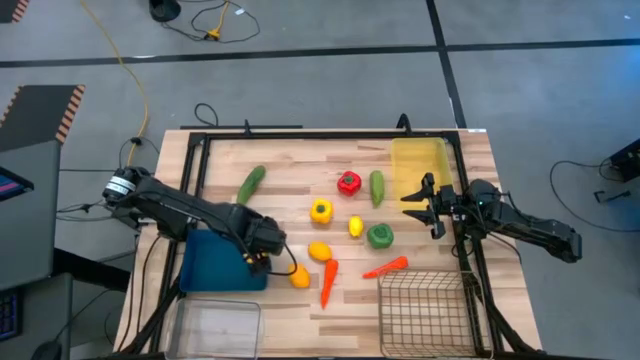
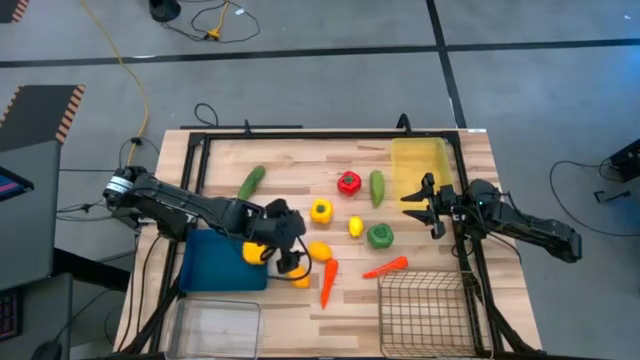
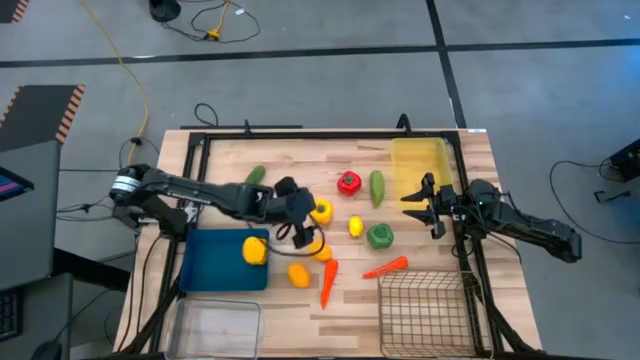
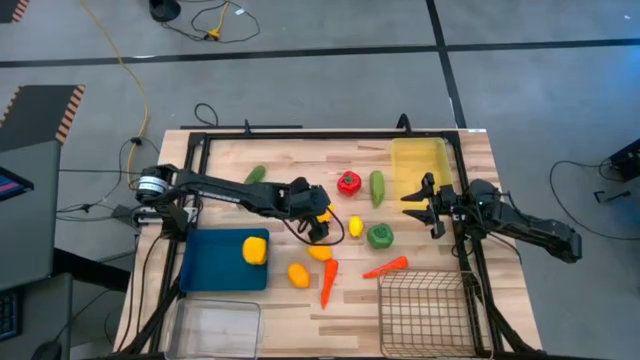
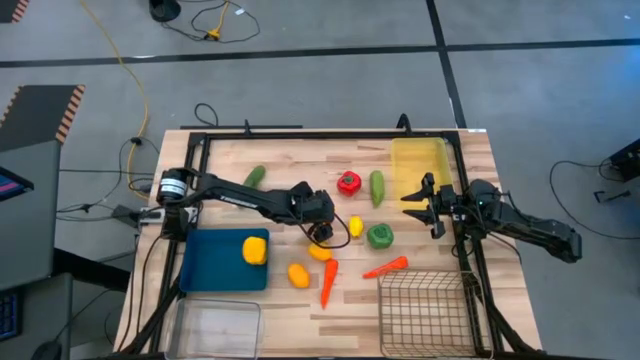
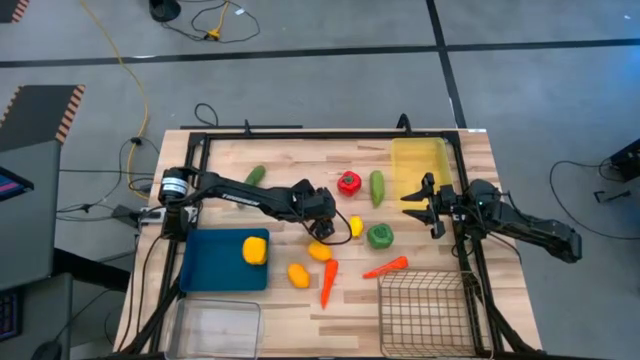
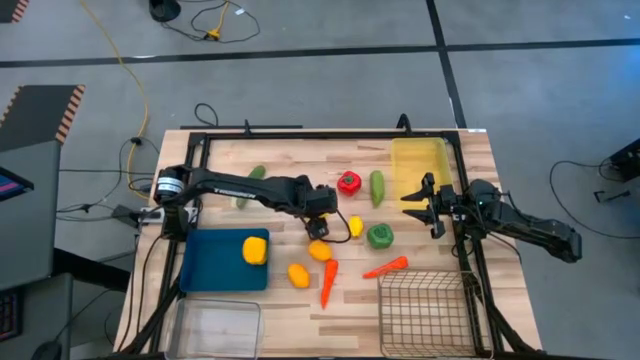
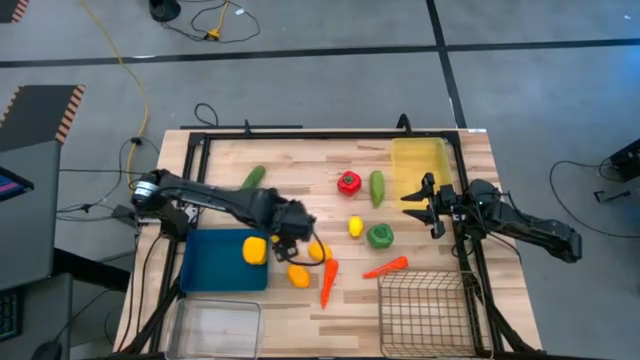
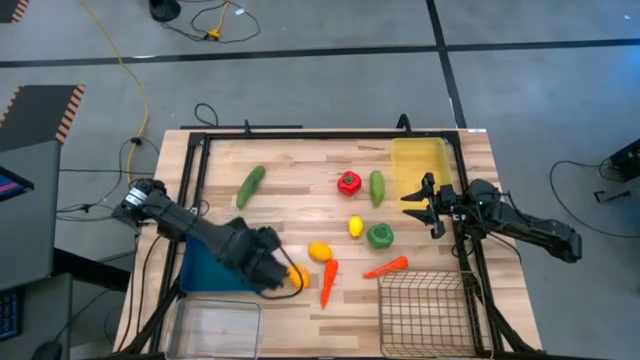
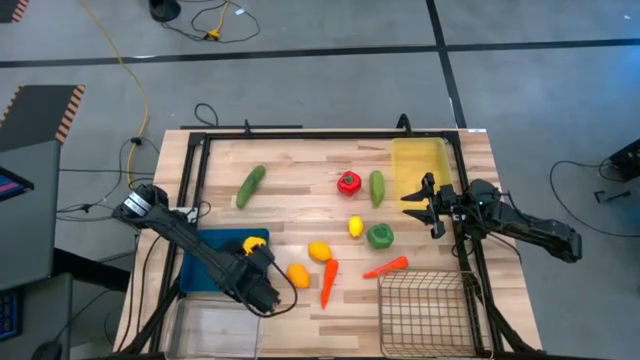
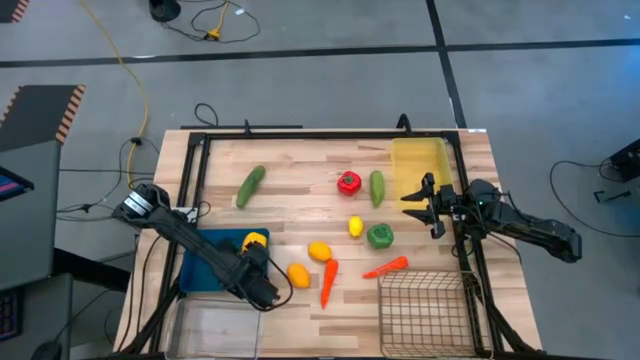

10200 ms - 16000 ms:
Task: Sort produce into baskets
Put the yellow bell pepper into the blue bin

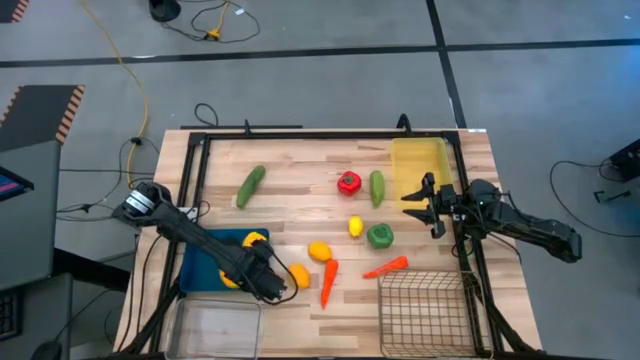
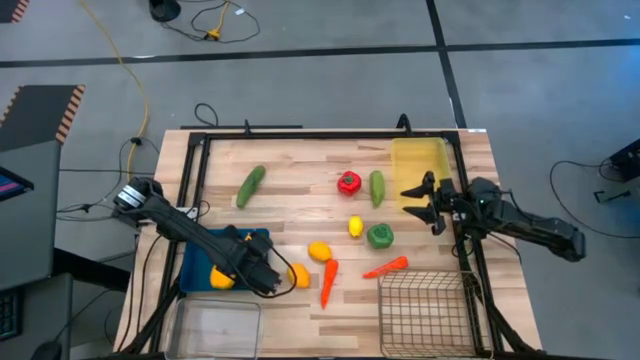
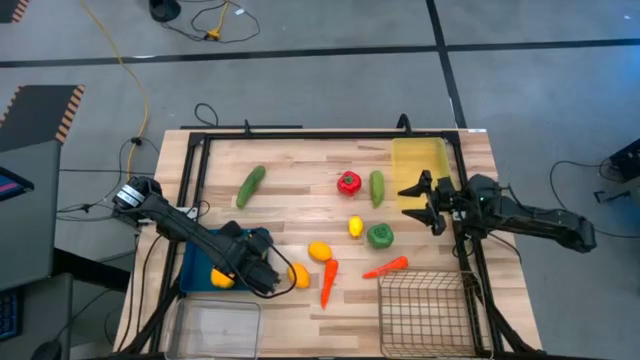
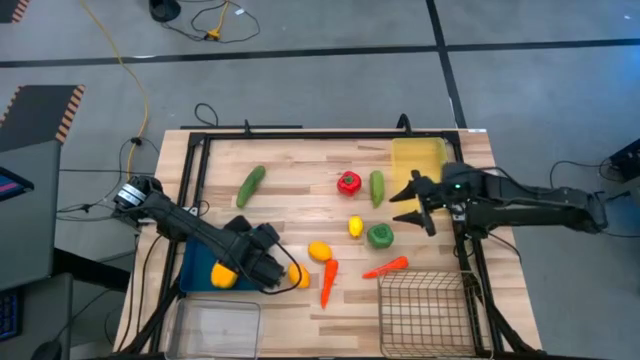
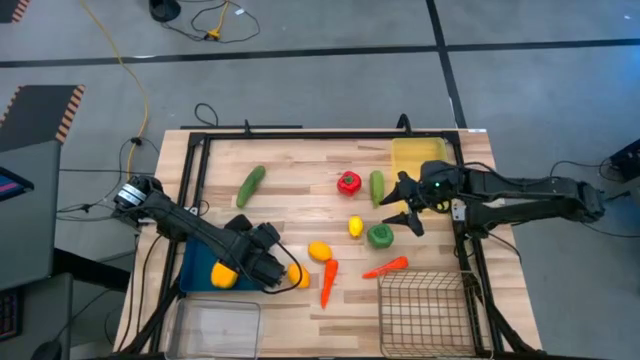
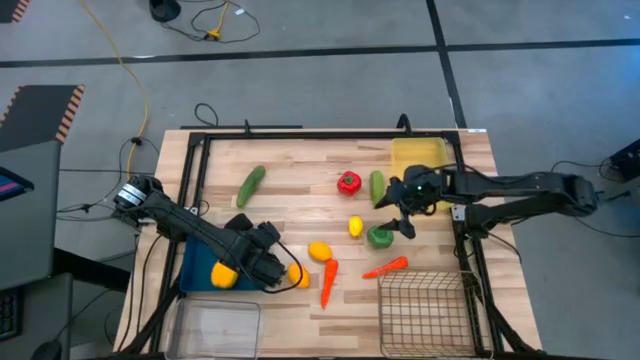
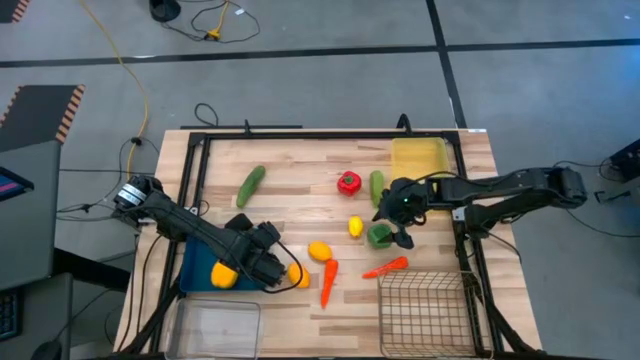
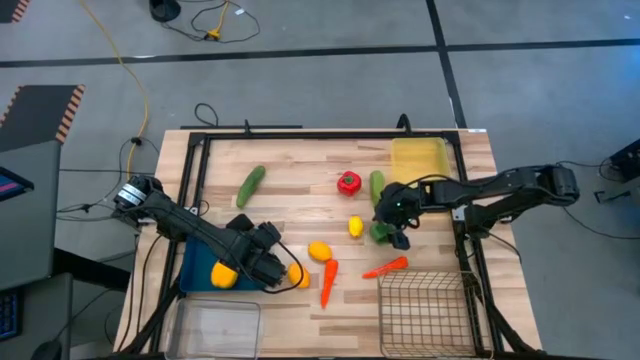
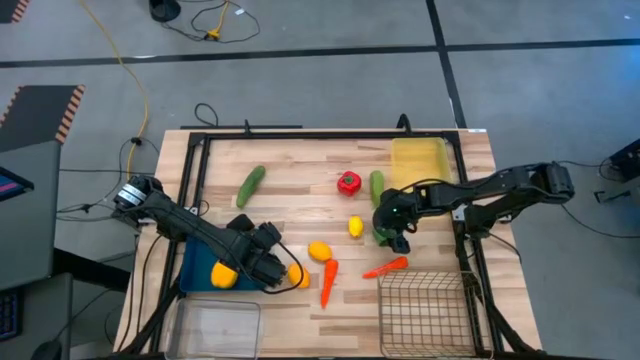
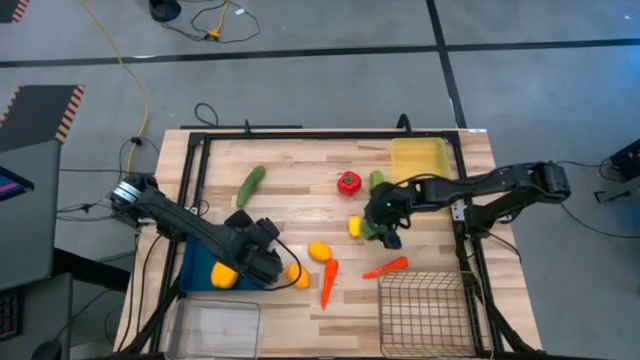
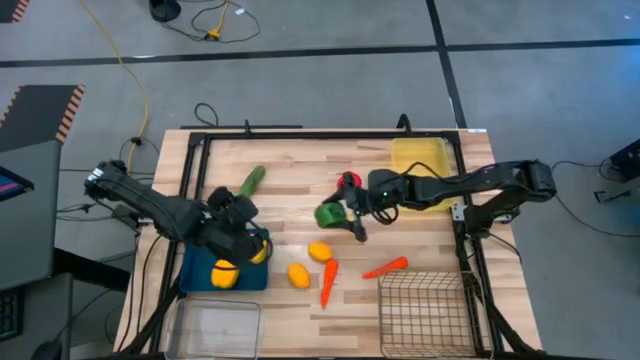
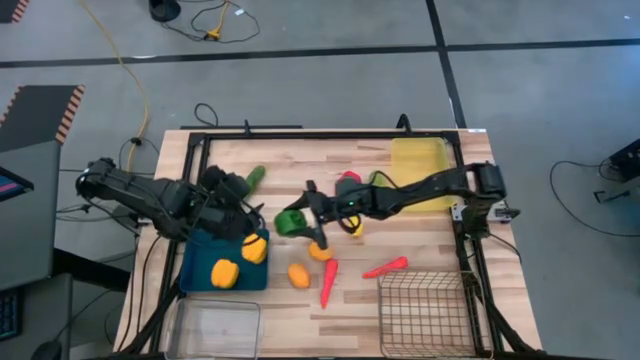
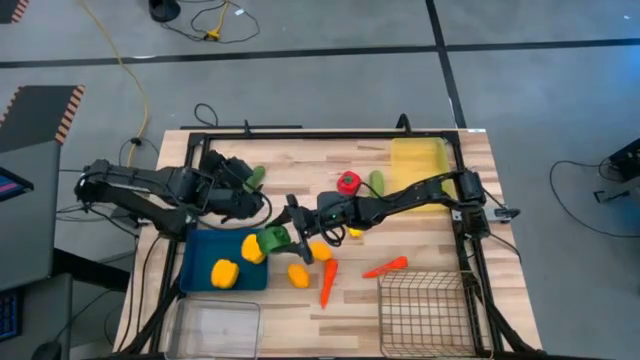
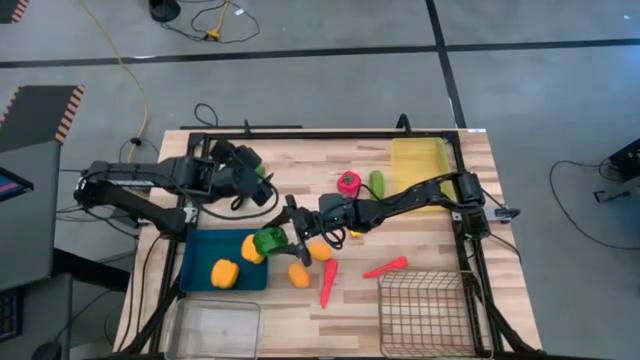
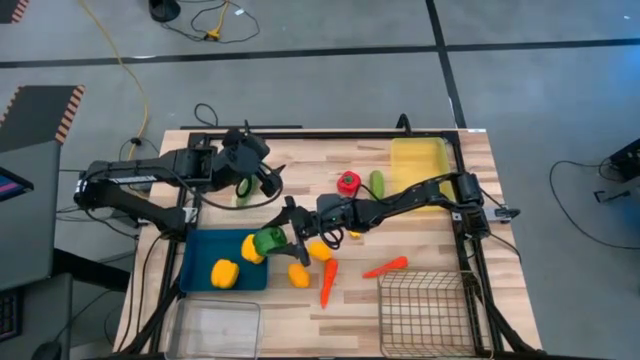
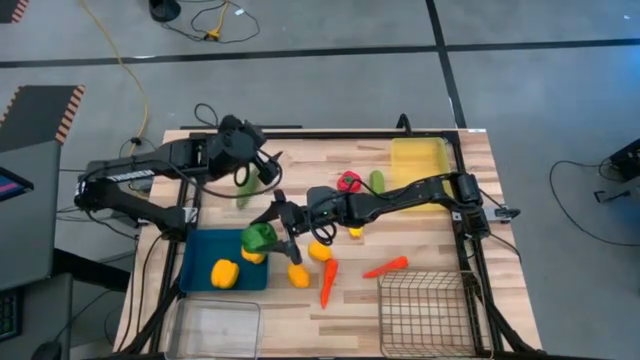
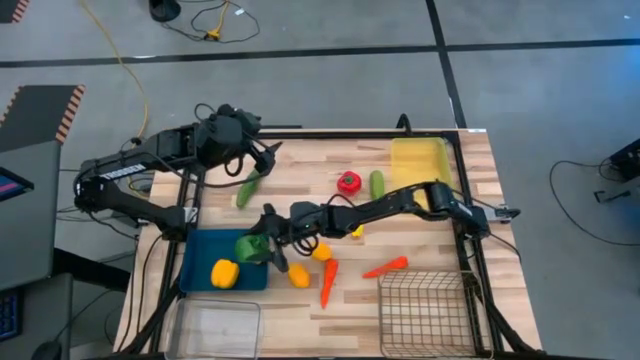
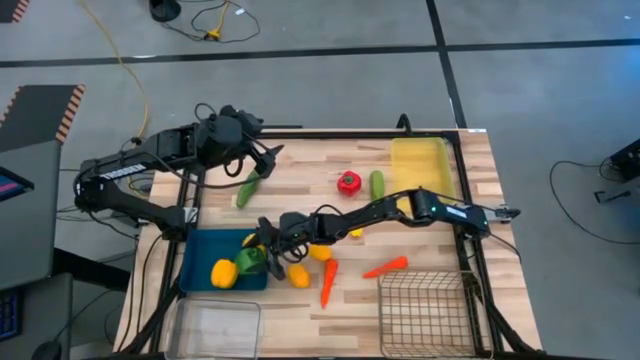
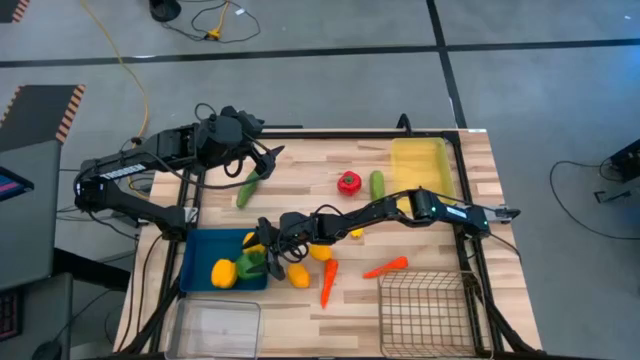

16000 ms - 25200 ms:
Put the green bell pepper into the blue bin

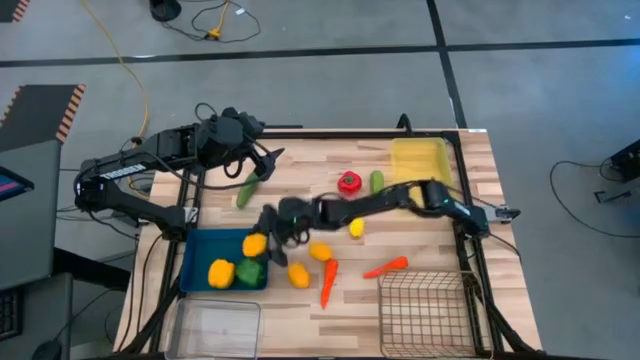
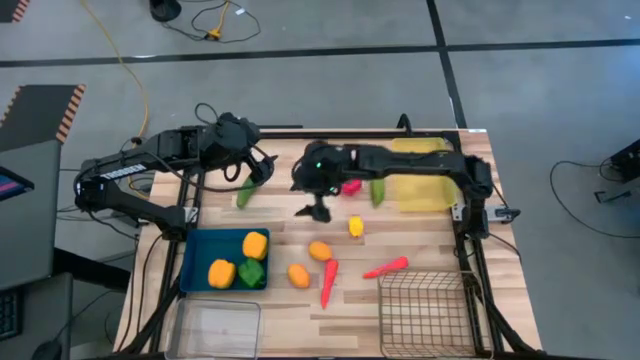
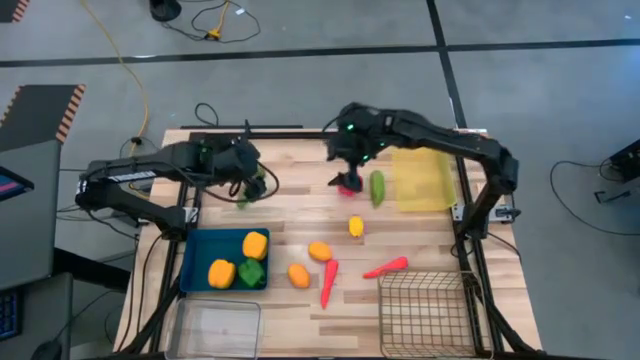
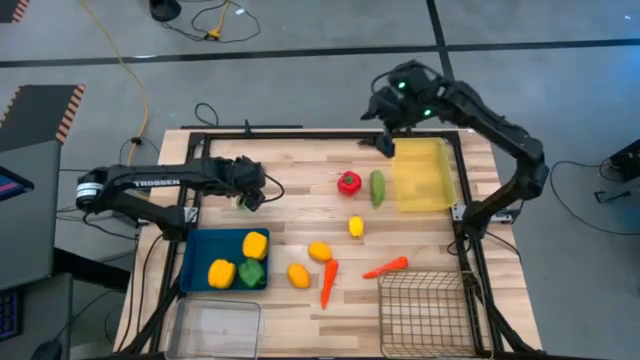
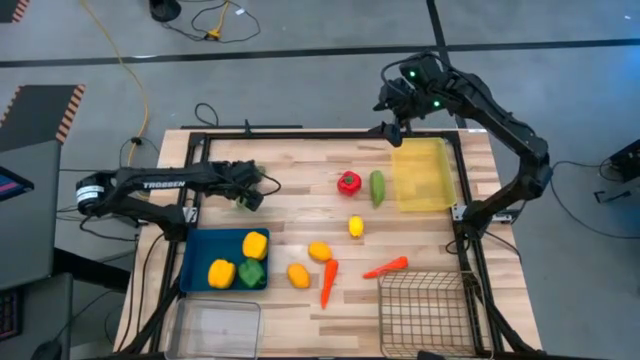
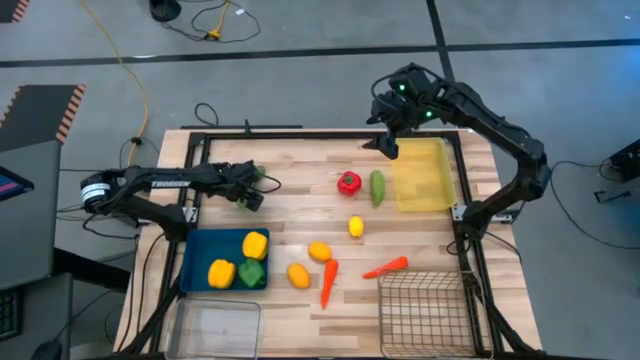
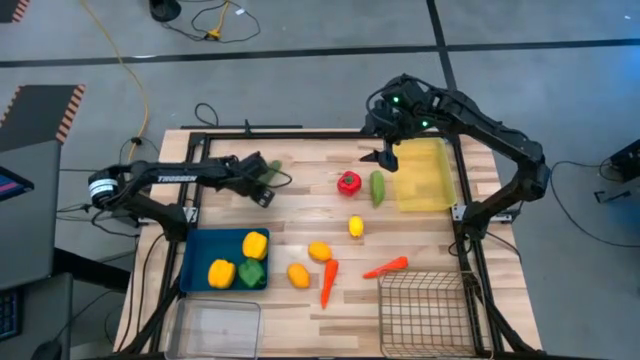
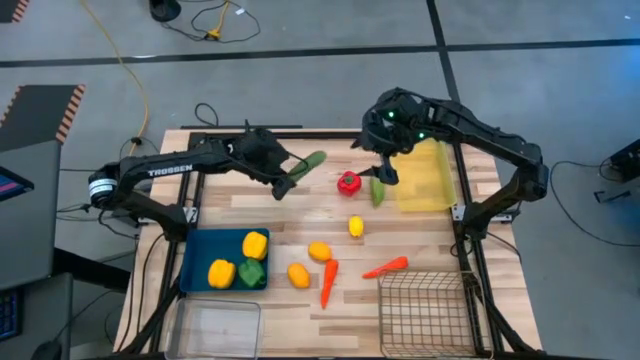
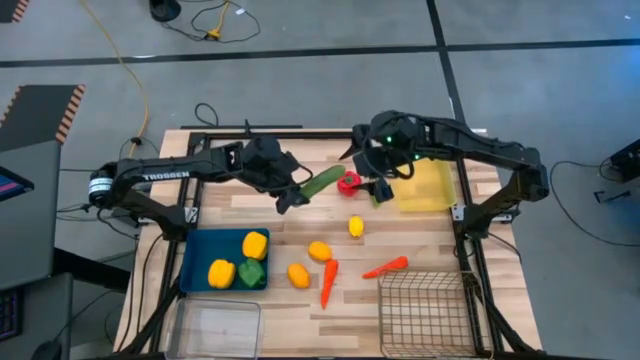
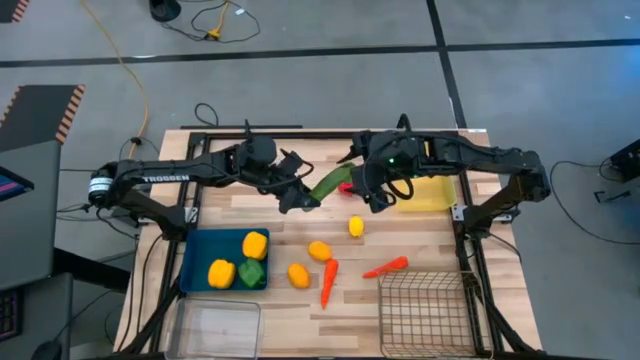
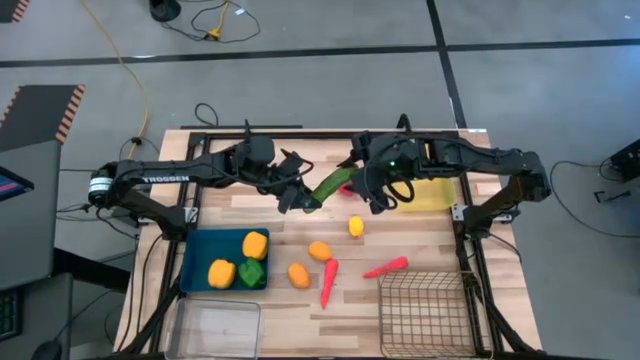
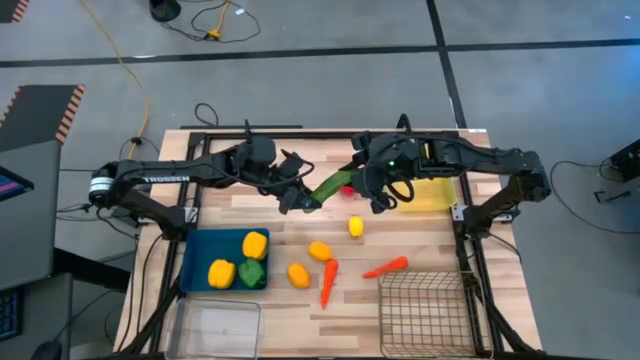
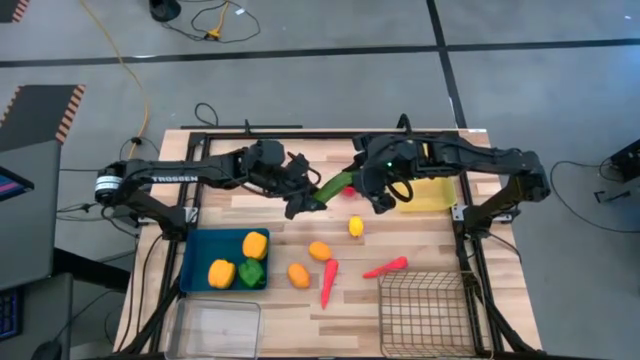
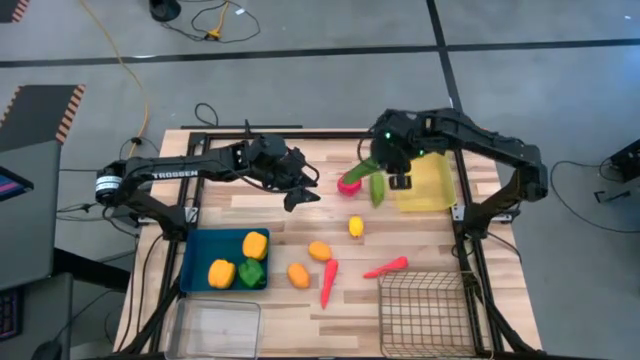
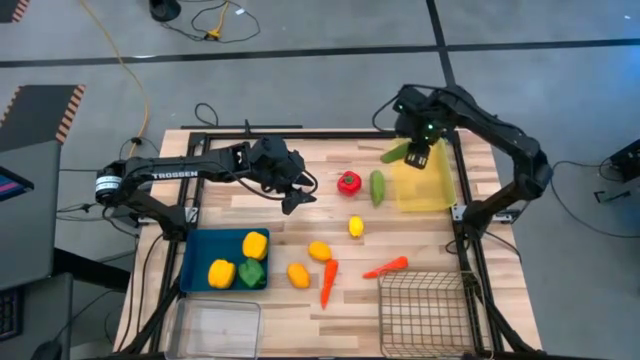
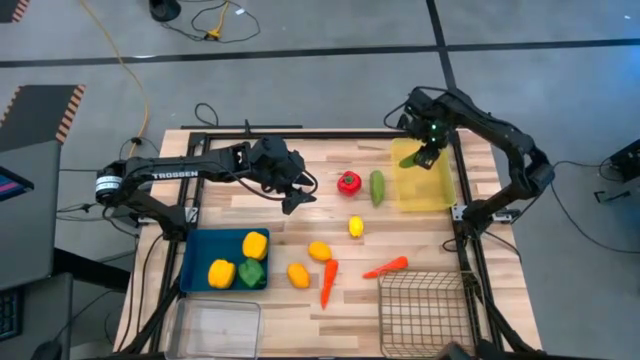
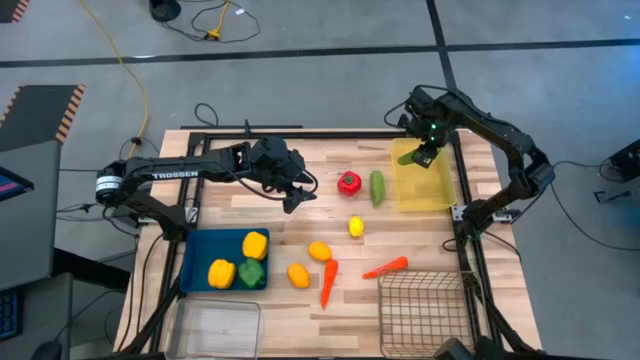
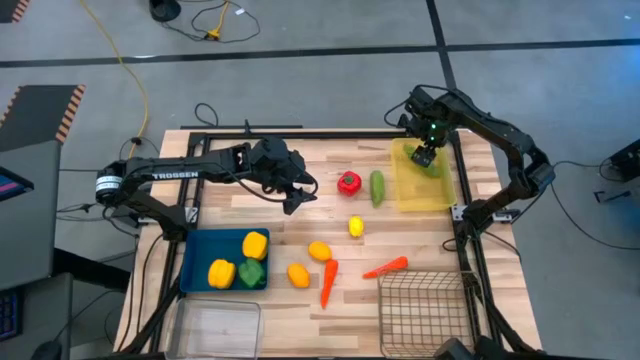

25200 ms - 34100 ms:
Put the left green cucumber into the yellow bin
